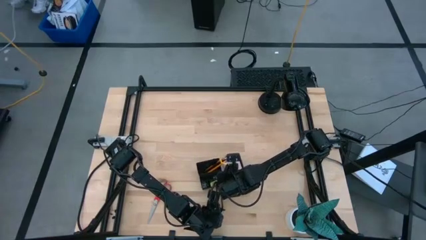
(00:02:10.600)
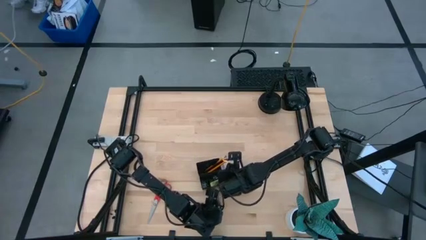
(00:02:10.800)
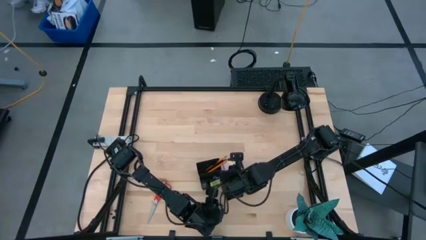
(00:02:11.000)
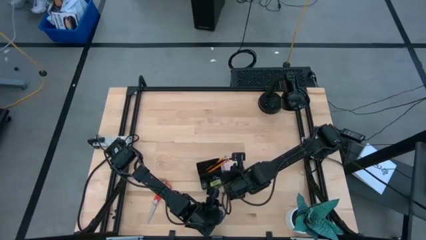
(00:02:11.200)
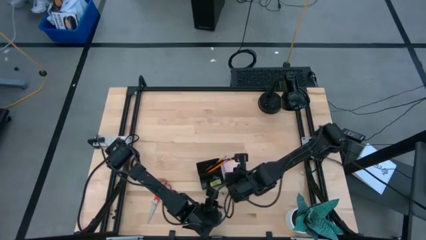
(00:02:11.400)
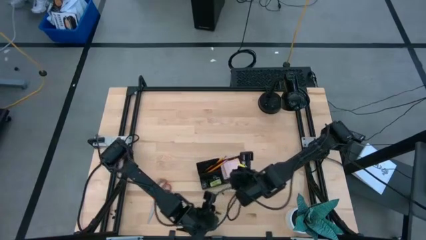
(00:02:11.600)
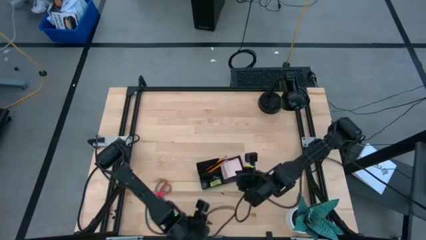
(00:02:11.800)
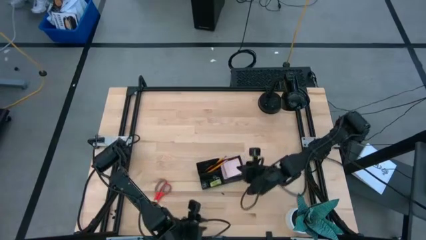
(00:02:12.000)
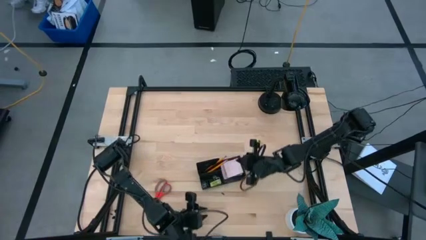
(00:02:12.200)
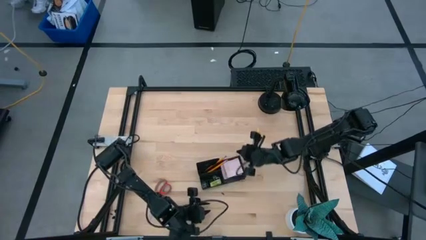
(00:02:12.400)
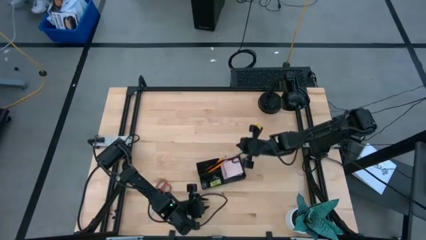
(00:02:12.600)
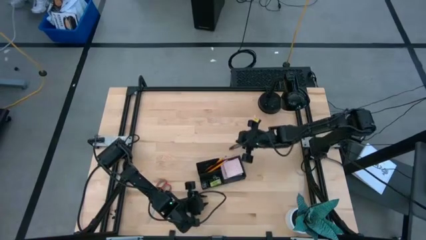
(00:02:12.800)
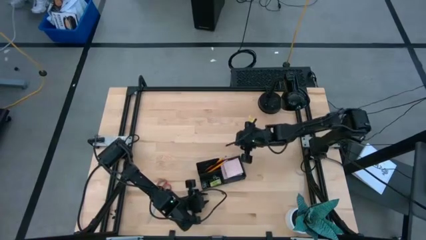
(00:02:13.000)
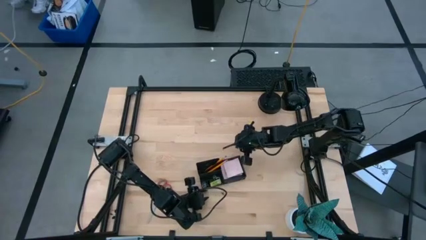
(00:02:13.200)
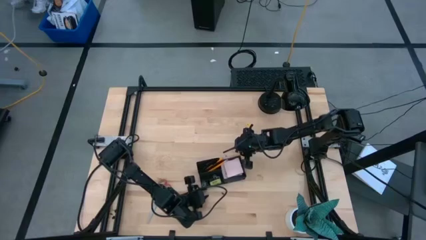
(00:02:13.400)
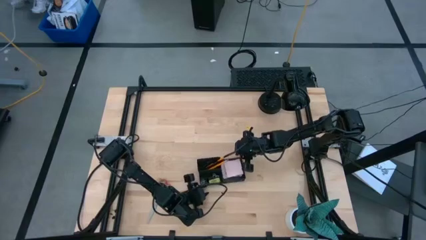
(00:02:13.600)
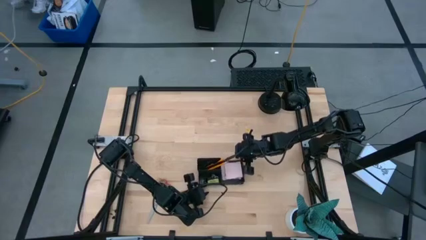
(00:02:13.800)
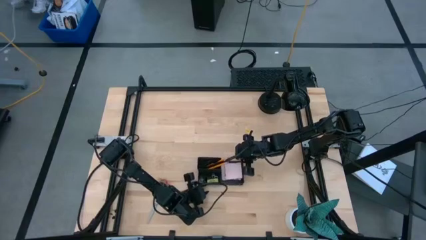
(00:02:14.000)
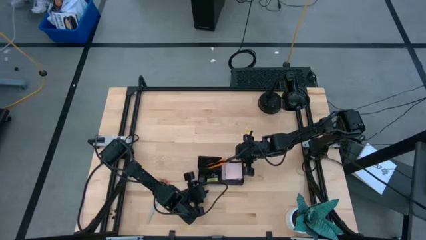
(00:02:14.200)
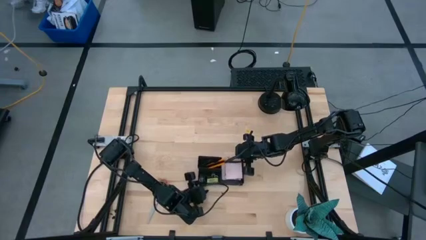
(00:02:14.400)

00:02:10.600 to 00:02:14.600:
Task: Pick and place office supplies into organizer
Adjust the desk organizer on the table

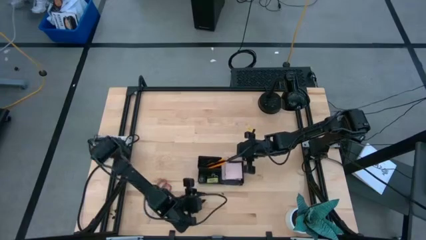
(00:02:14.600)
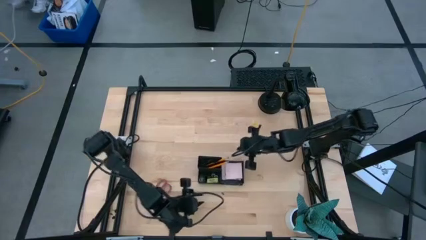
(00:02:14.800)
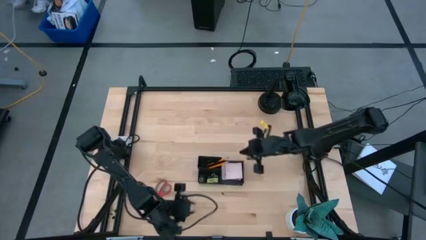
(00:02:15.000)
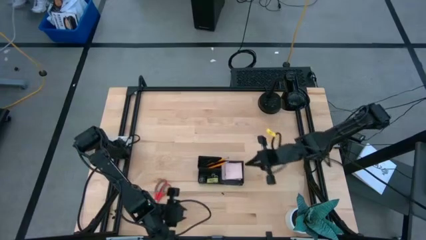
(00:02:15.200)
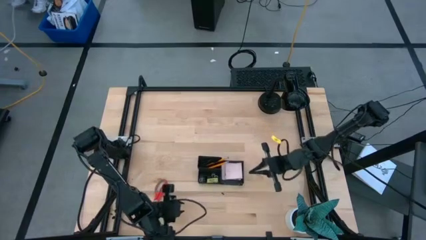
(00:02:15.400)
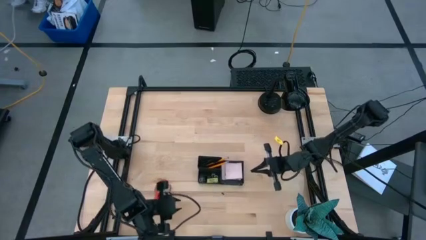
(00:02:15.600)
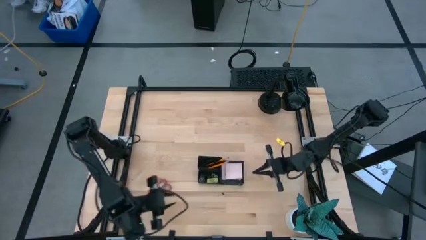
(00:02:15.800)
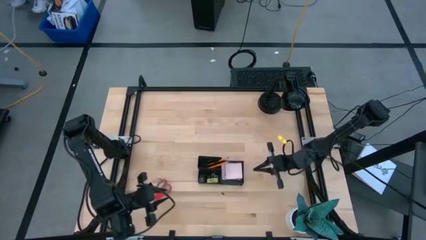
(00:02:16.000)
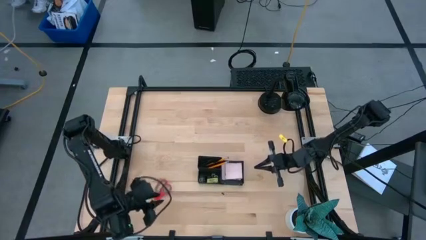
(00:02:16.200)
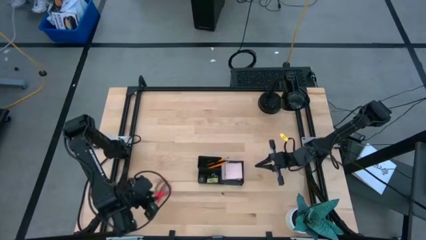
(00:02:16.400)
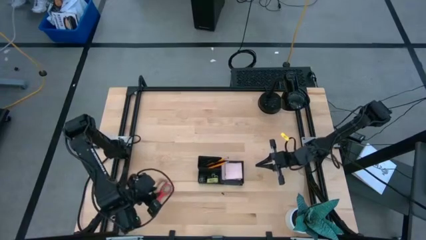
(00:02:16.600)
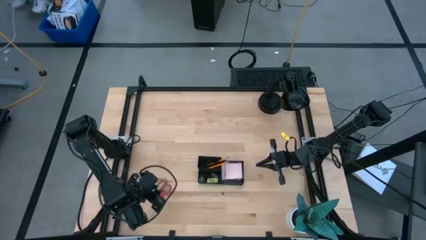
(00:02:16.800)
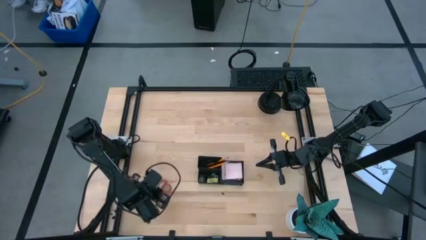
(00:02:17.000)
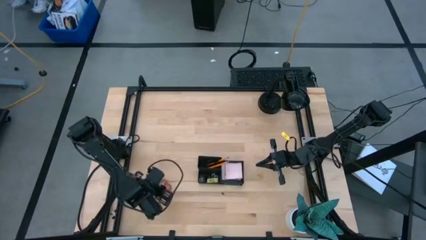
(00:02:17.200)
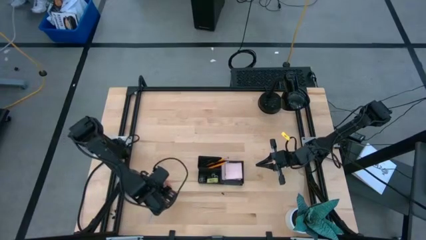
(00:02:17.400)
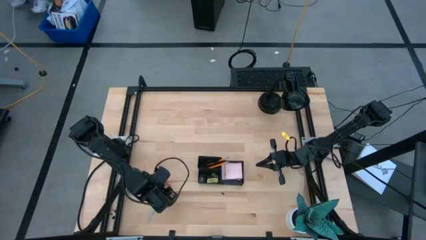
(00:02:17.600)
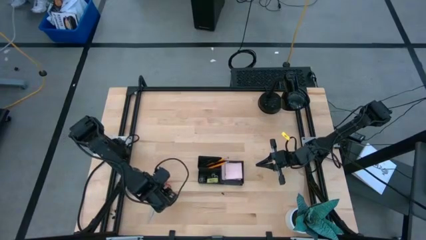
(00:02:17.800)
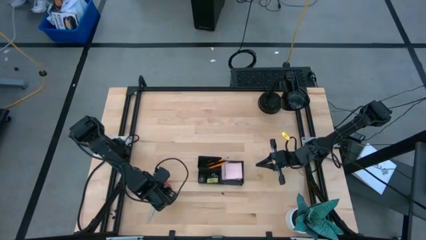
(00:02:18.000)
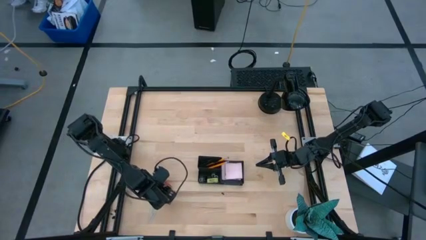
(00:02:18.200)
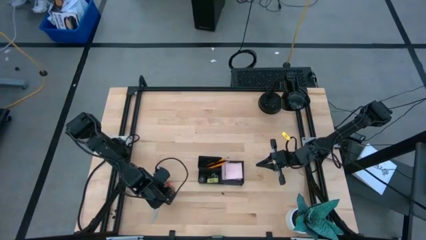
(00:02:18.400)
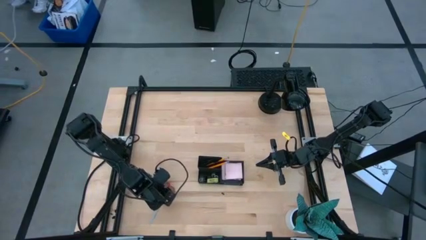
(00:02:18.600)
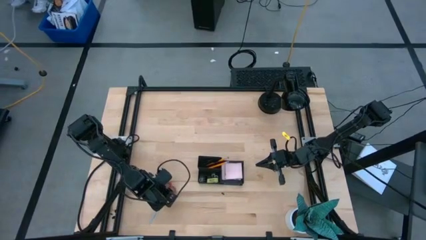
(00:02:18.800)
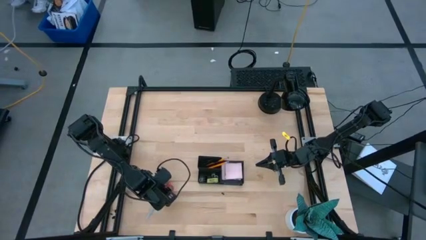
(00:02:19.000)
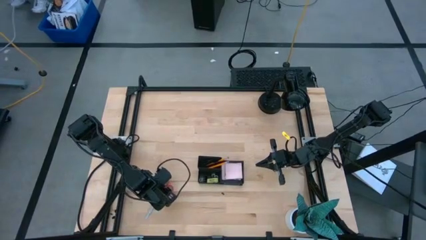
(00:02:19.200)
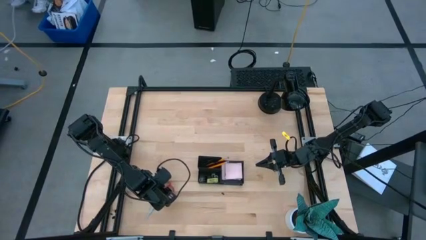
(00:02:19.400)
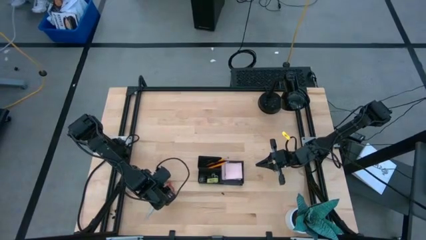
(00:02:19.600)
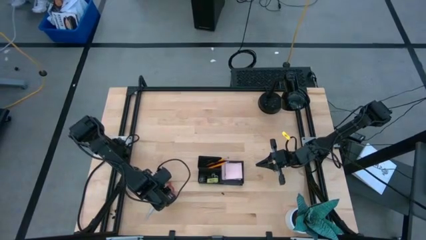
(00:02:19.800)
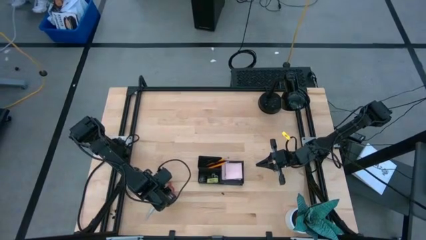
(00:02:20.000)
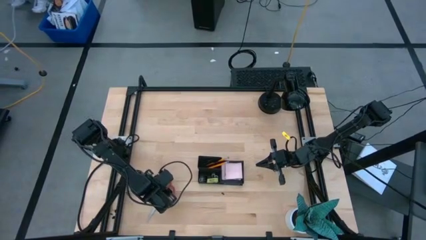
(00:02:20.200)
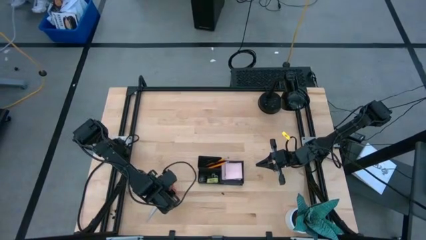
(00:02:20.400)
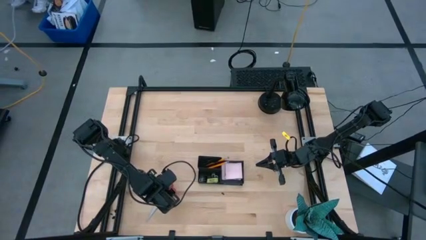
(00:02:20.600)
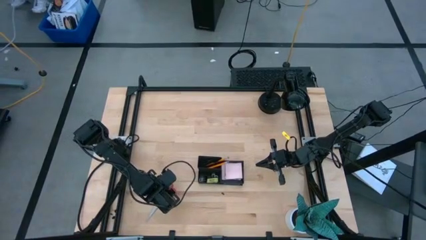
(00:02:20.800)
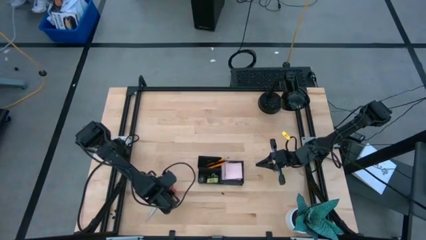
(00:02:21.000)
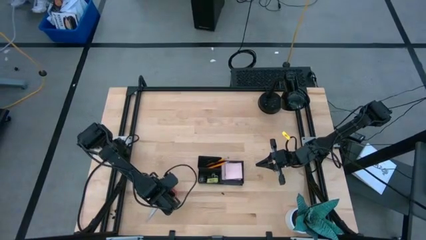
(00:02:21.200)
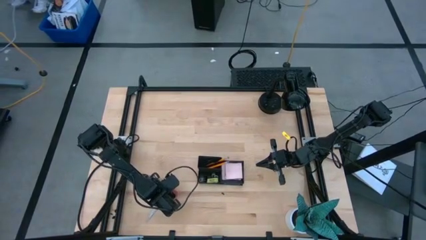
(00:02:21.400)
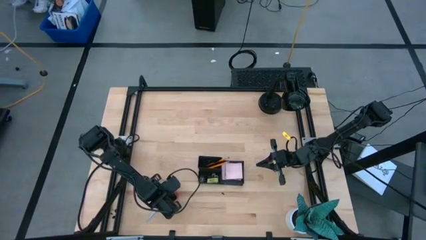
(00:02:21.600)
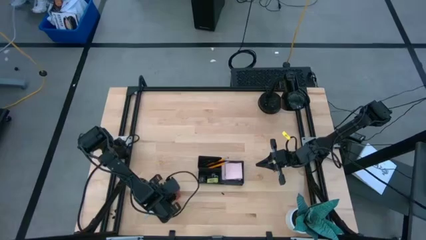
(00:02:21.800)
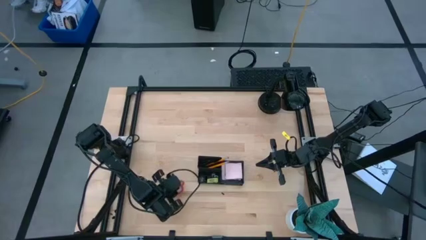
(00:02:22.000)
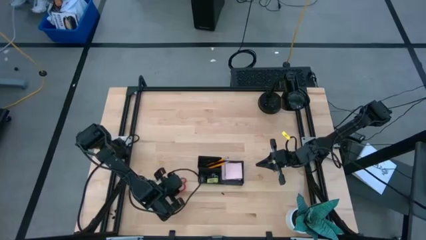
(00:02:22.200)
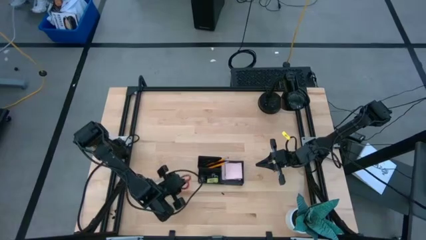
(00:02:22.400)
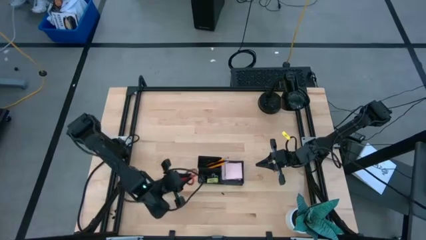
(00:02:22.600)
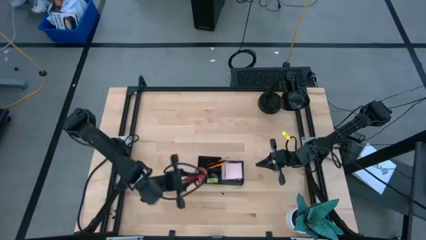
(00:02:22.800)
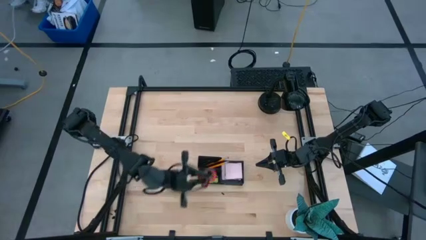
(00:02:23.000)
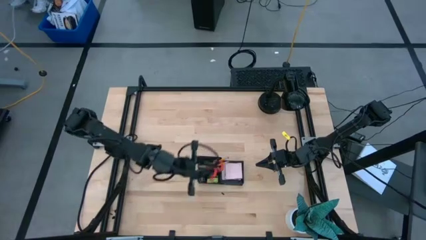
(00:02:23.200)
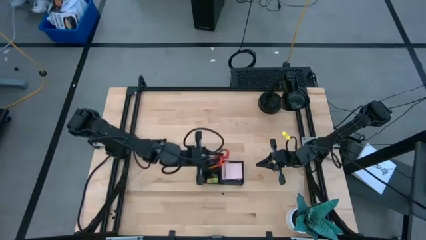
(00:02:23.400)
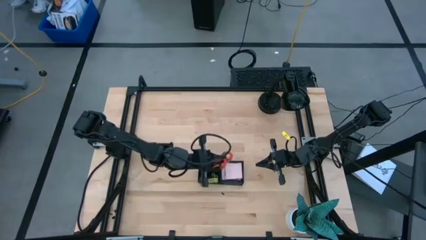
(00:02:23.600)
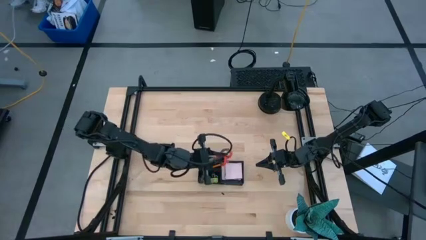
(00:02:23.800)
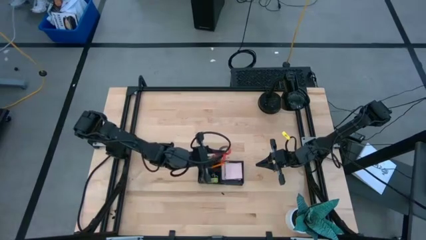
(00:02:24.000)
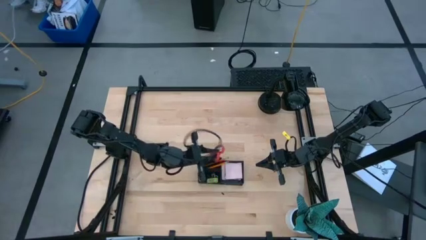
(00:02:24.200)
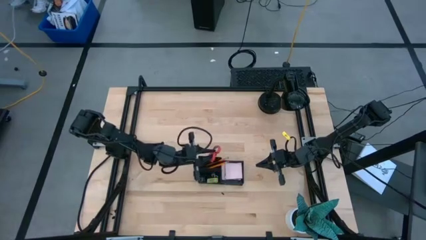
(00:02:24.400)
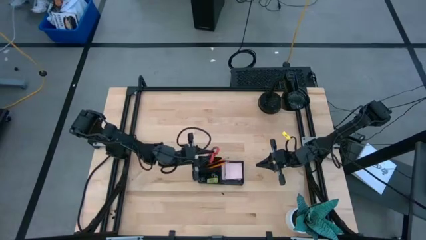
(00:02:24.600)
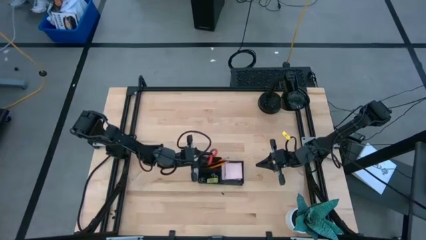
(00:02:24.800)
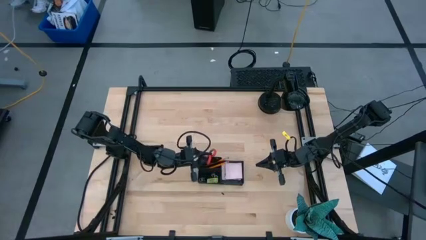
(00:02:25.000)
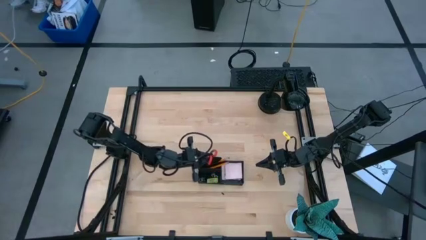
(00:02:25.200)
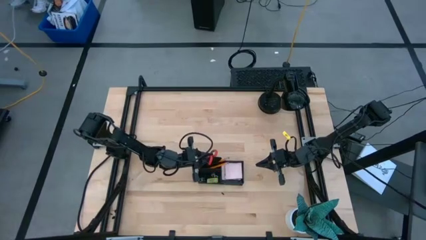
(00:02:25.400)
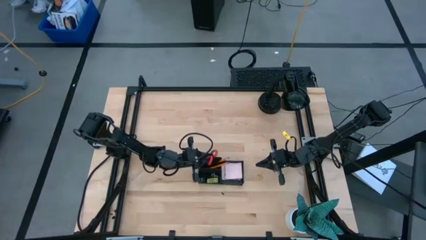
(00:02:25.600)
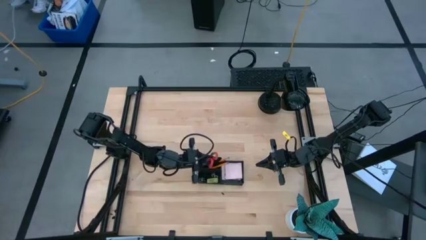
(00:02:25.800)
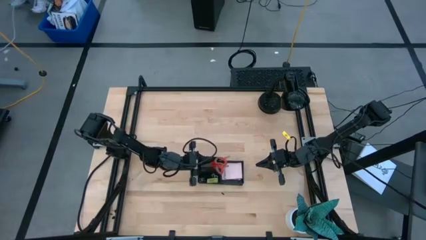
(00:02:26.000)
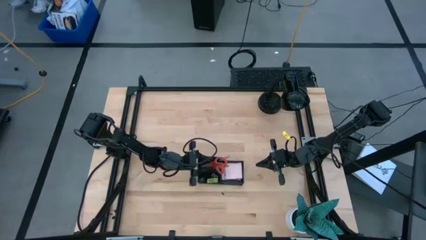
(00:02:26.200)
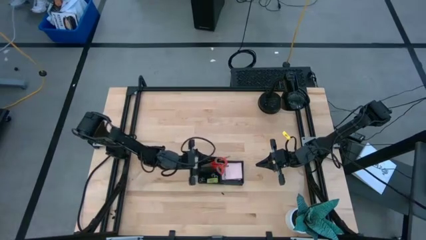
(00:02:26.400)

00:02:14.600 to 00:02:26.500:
Put the scissors into the top left section of the desk organizer
